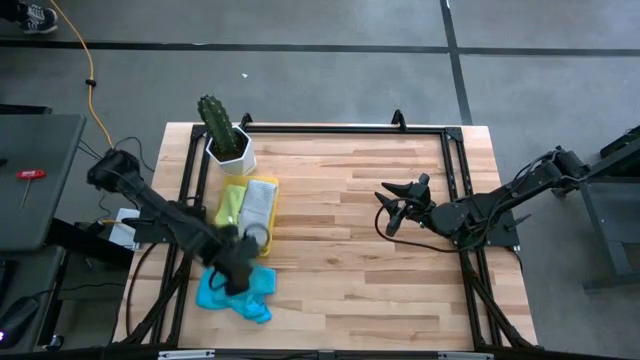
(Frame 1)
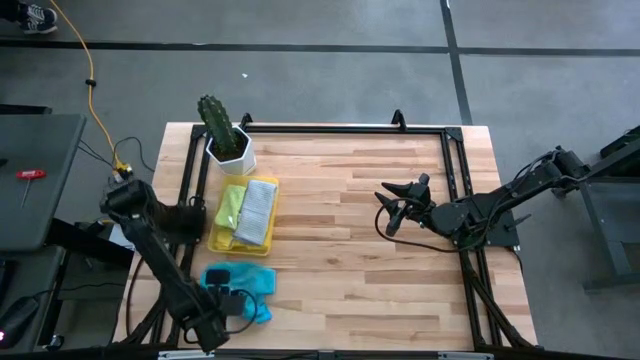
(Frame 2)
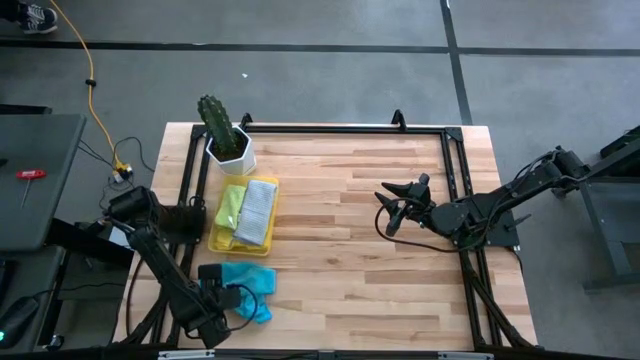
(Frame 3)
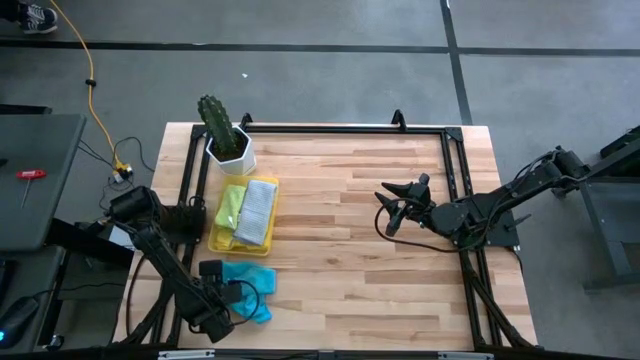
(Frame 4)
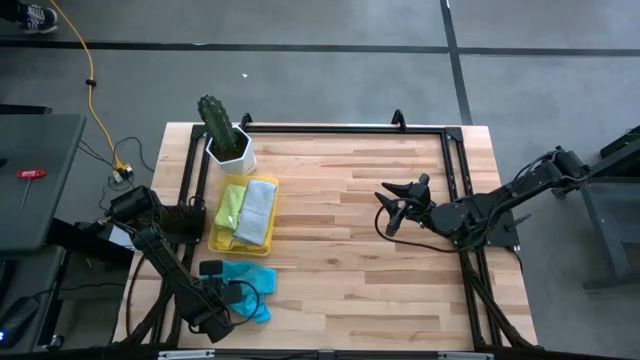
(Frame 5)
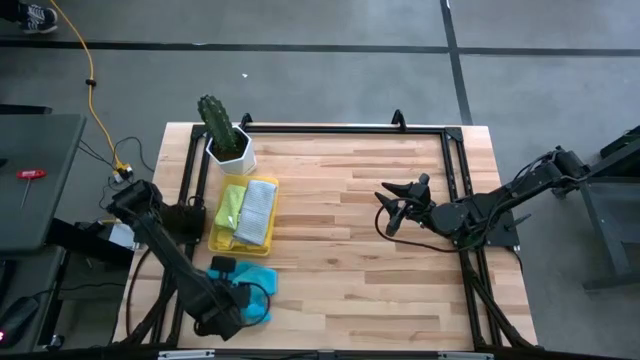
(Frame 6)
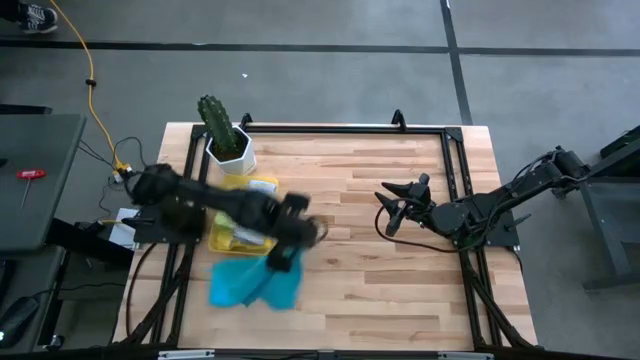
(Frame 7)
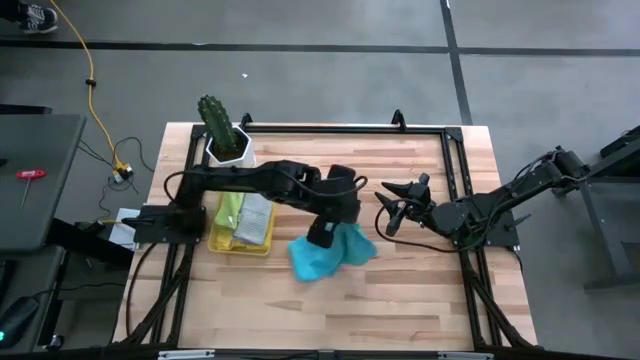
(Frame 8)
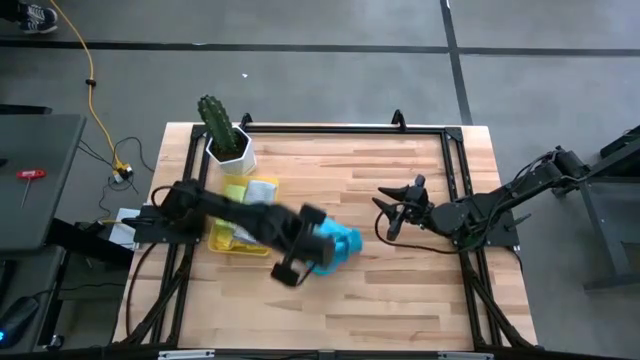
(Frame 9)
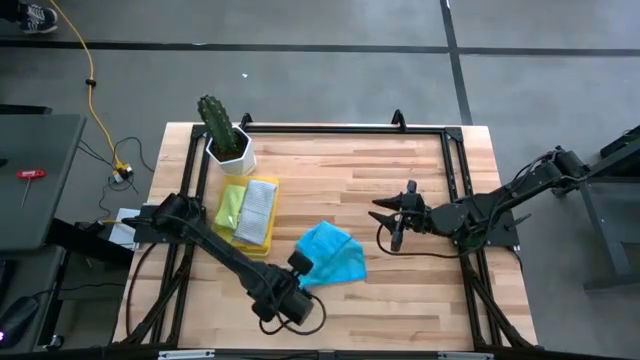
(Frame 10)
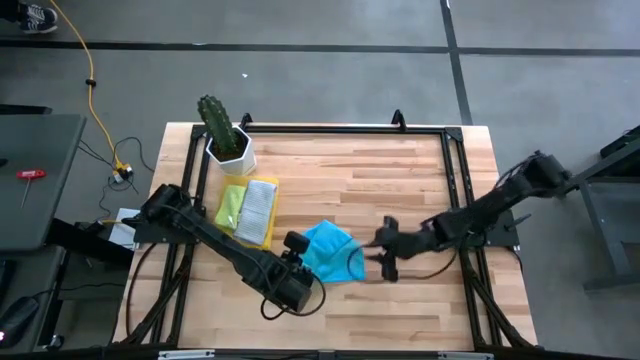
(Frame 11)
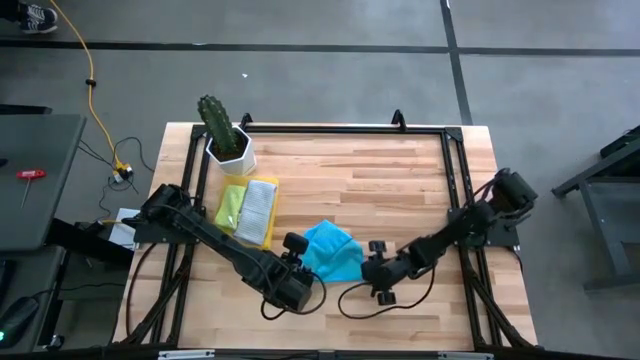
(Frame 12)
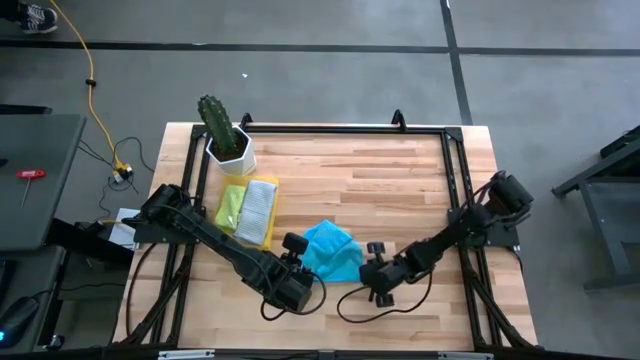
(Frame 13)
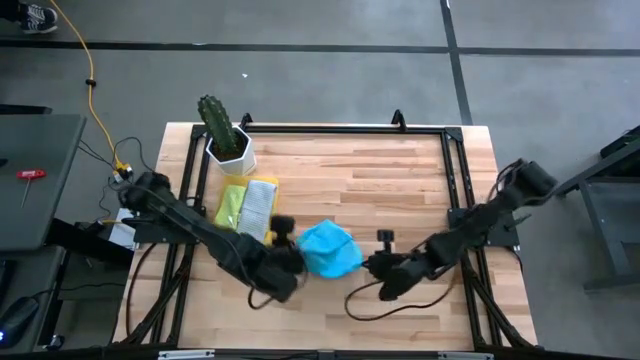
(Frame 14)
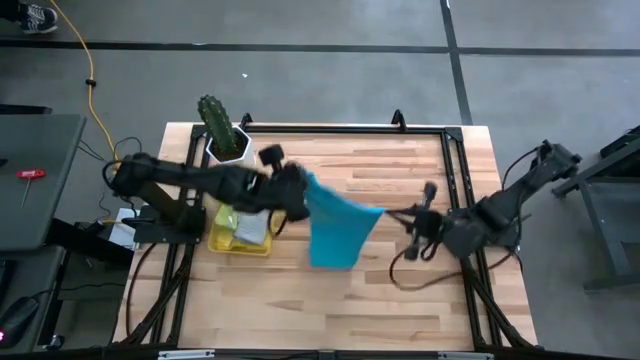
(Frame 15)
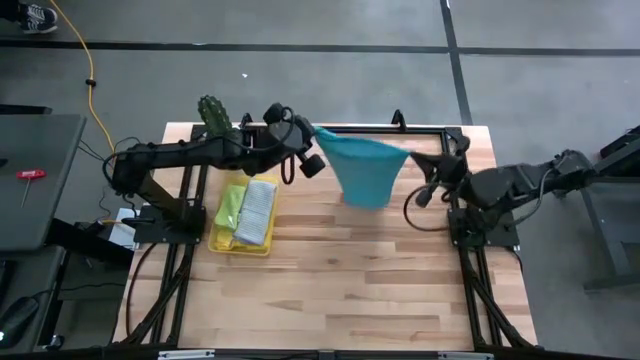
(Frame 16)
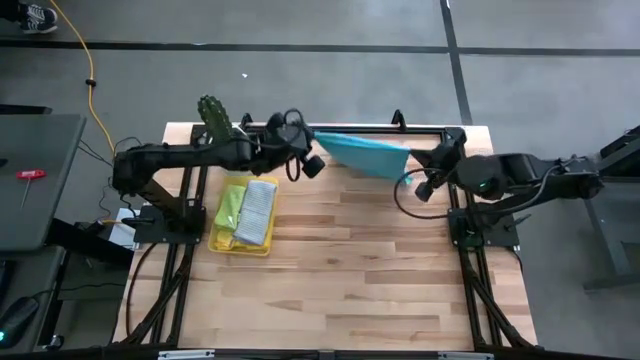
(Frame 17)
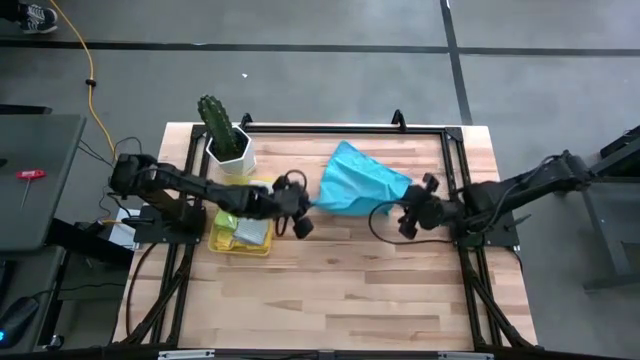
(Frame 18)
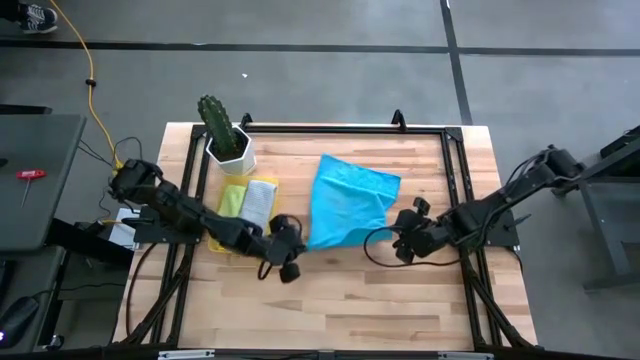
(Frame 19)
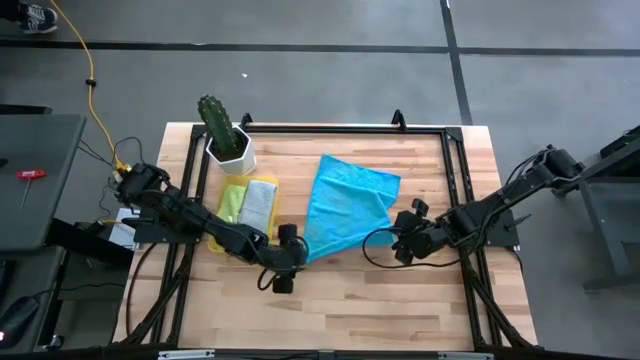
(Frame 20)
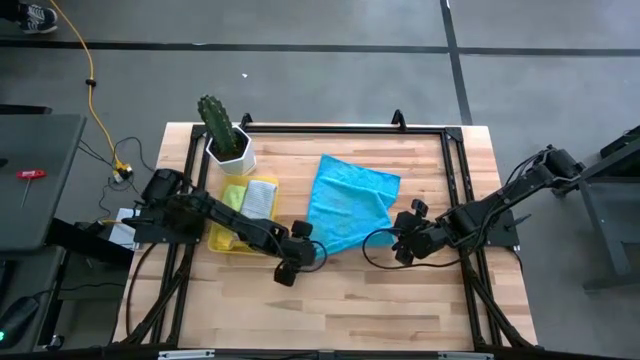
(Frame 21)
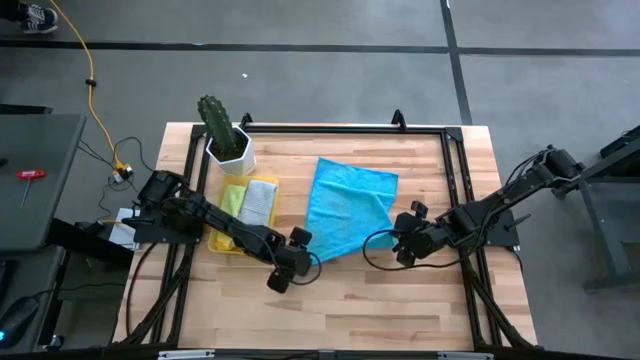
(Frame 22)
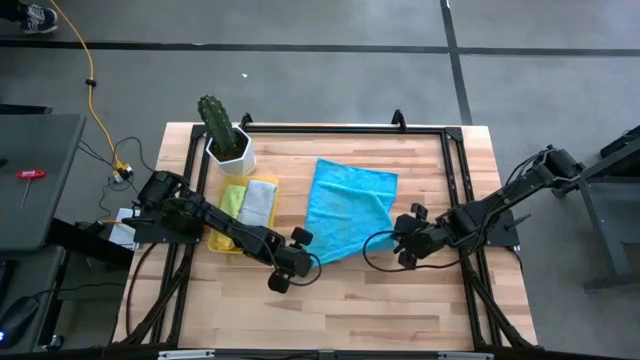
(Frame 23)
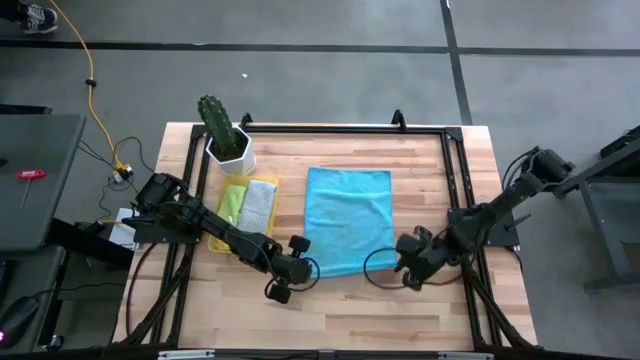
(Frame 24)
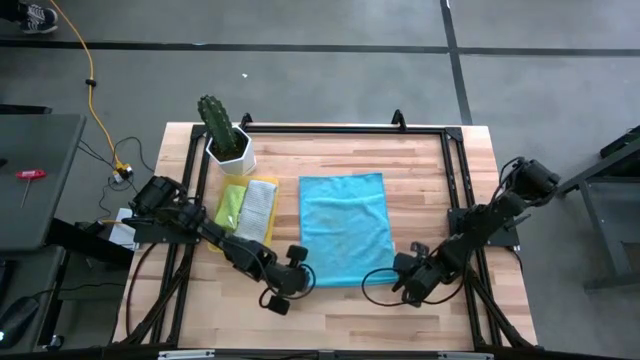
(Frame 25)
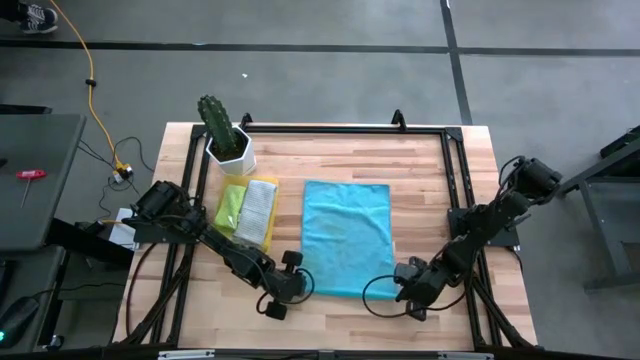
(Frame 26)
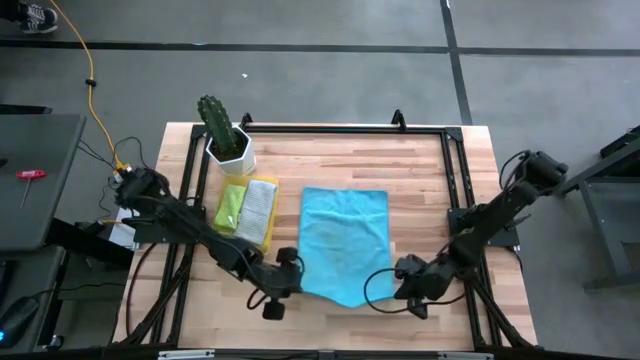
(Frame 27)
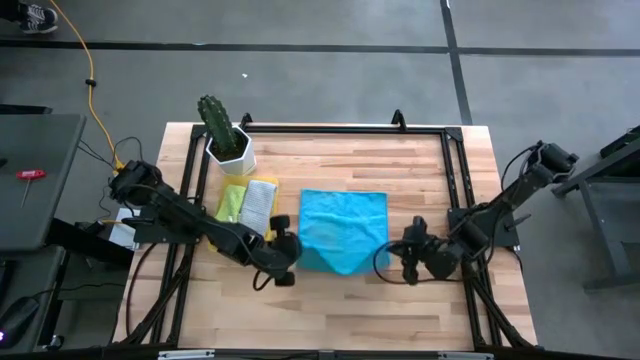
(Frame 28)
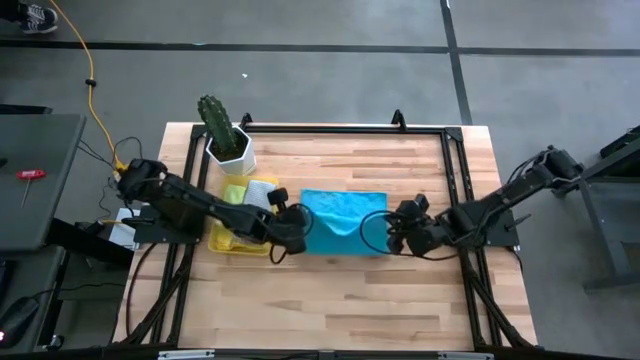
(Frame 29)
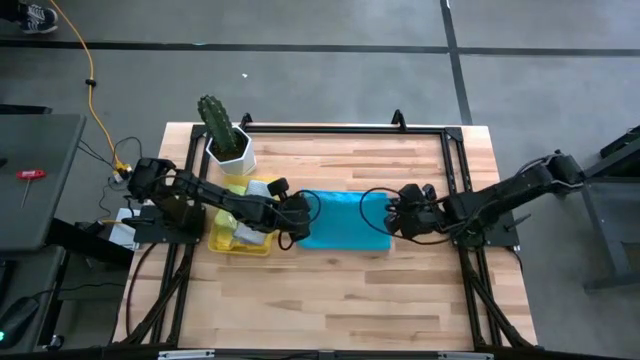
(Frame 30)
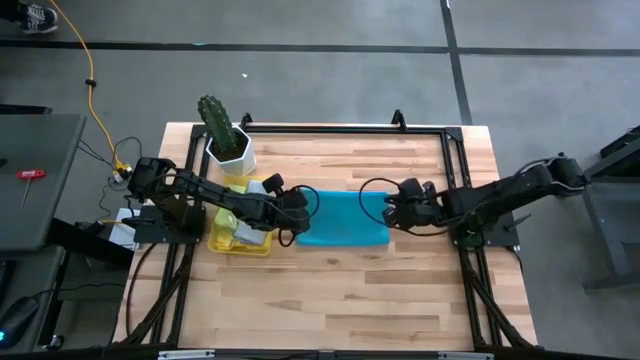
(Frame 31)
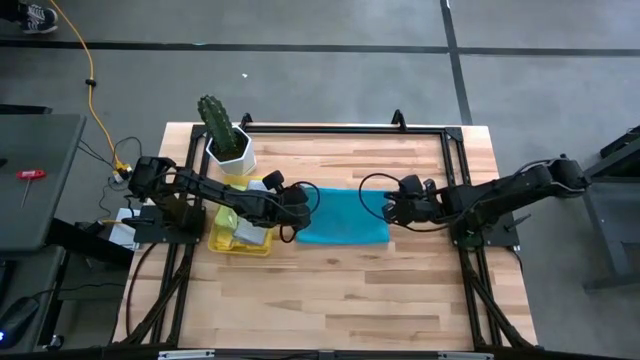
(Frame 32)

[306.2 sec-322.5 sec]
Task: Fold microfiber towels
Fold the blue microfiber towel

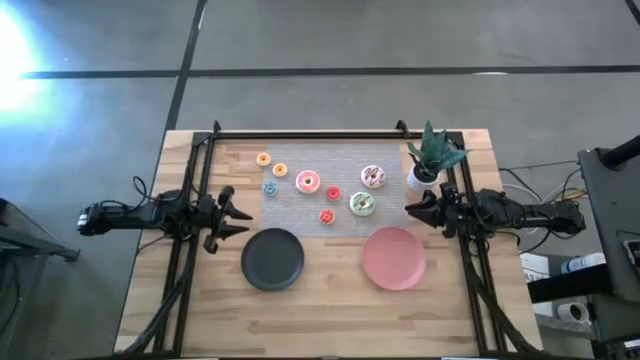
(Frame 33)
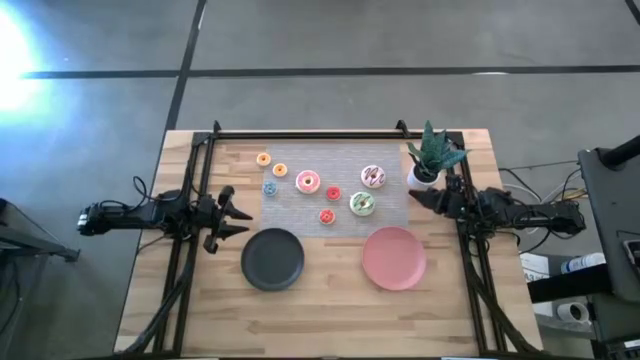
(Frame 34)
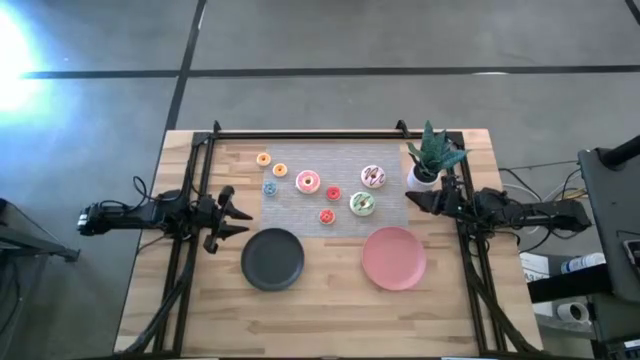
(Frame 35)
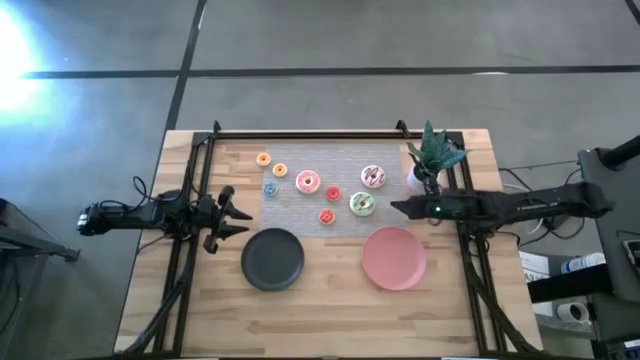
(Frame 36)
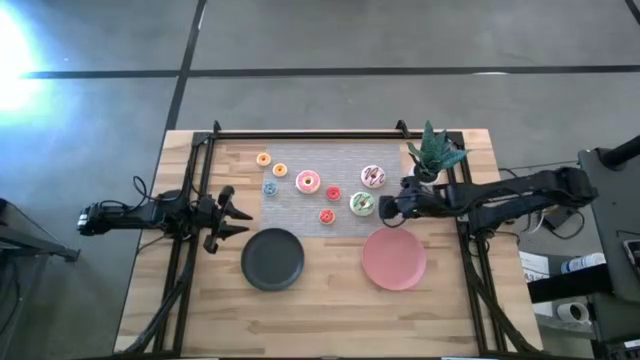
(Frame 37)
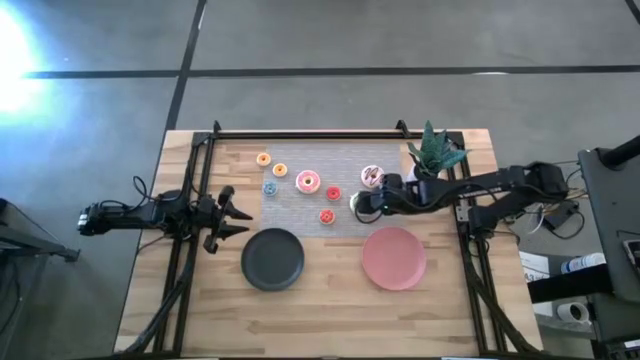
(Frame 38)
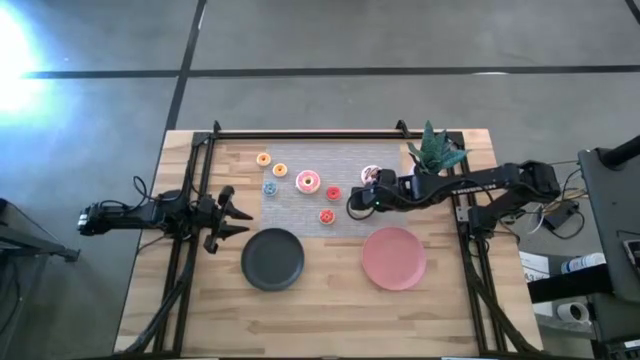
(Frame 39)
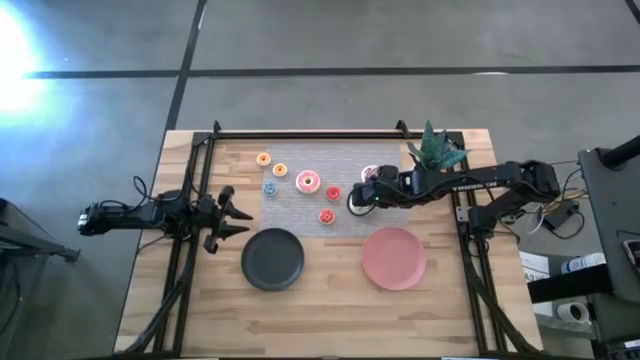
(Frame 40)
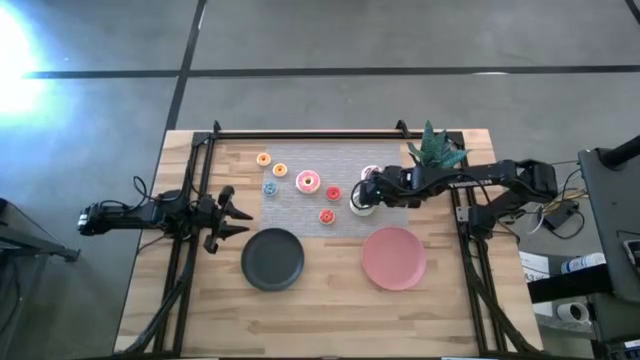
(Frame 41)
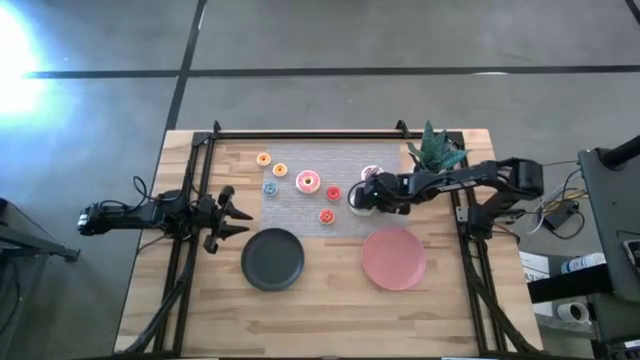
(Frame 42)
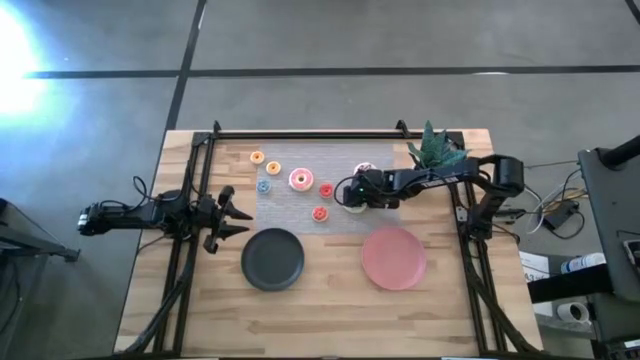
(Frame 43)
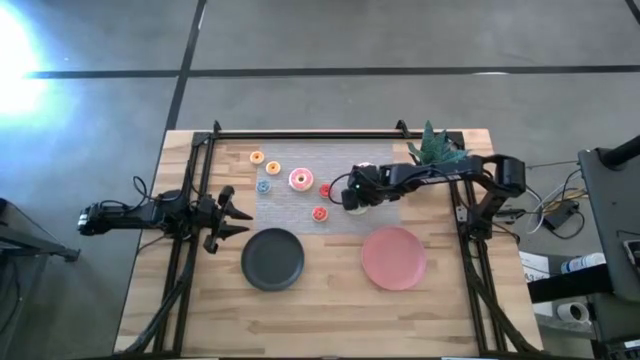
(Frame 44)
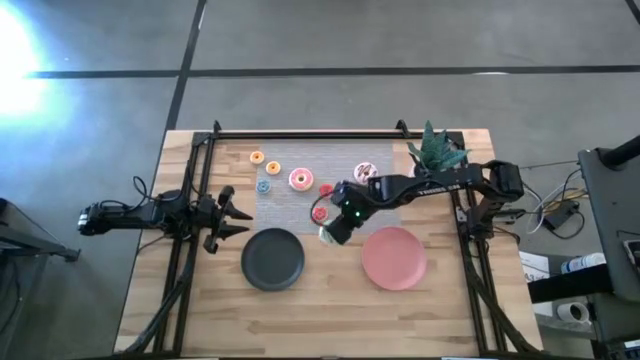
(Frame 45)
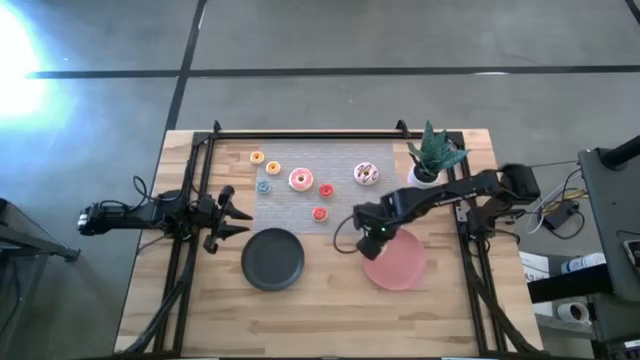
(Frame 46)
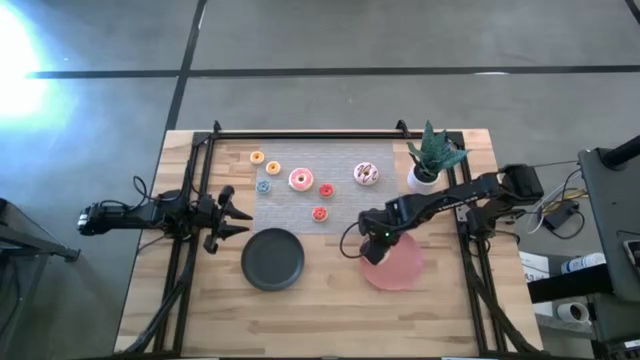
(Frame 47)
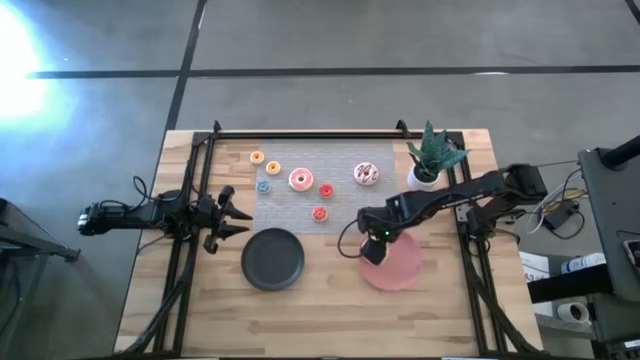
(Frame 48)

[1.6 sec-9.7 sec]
Task: Pick & Place donuts
Put the large light green donut on the pink plate
